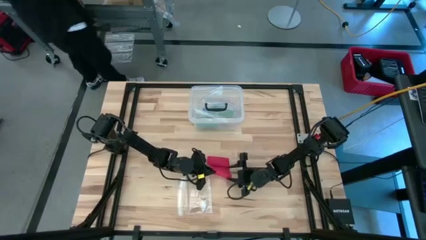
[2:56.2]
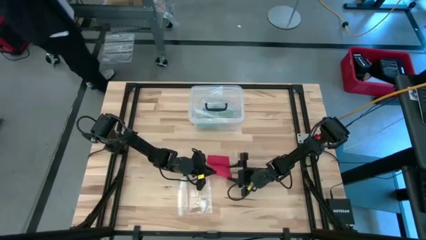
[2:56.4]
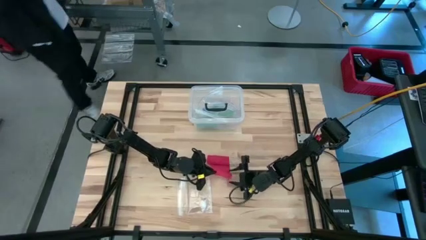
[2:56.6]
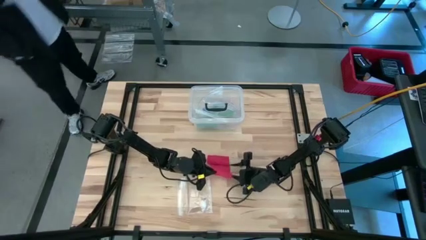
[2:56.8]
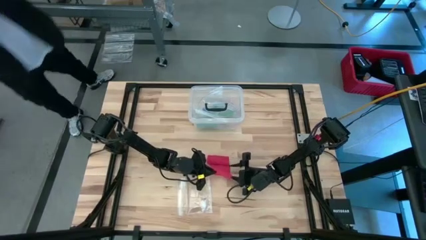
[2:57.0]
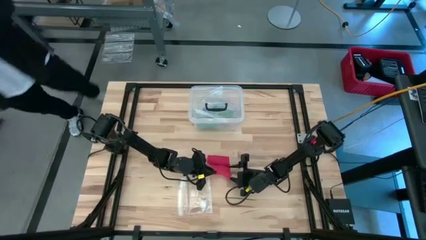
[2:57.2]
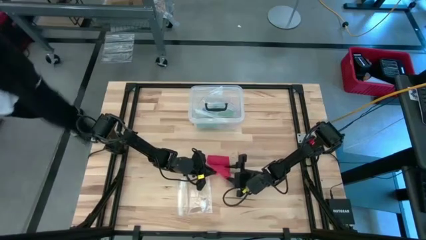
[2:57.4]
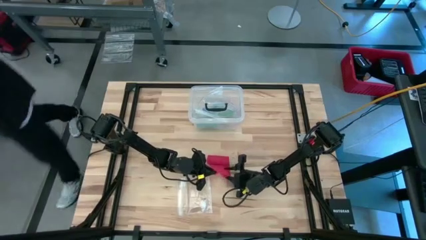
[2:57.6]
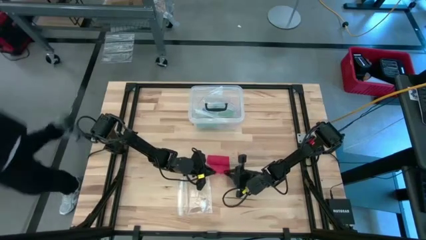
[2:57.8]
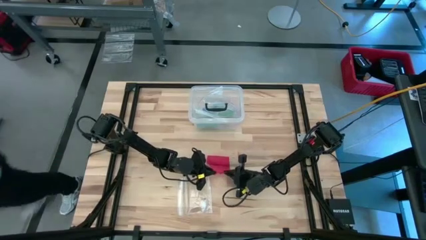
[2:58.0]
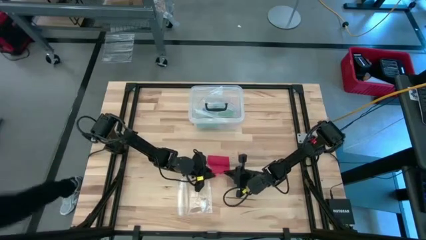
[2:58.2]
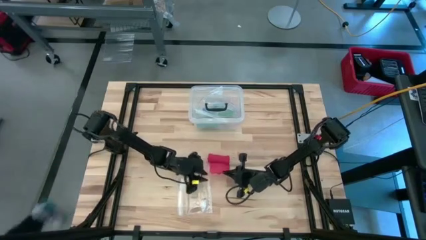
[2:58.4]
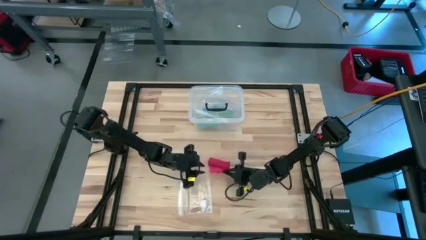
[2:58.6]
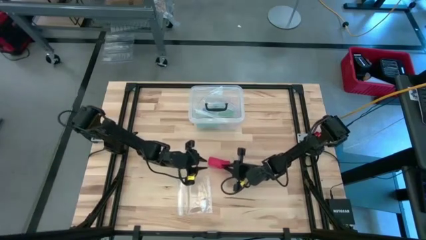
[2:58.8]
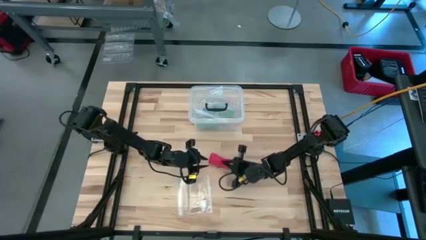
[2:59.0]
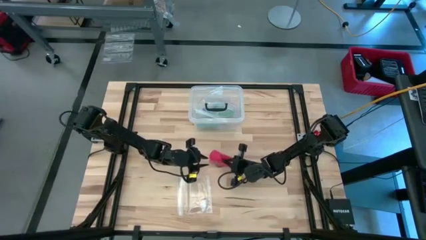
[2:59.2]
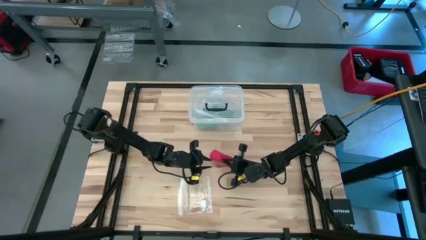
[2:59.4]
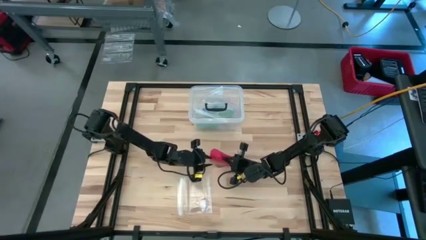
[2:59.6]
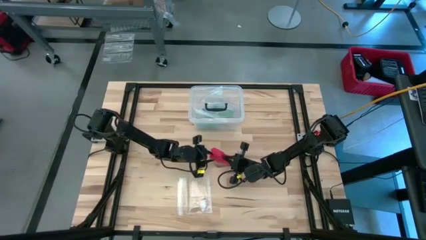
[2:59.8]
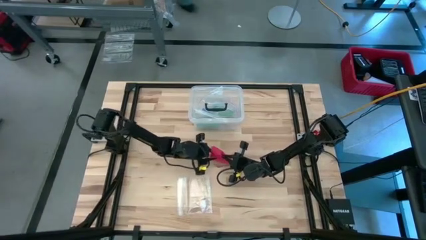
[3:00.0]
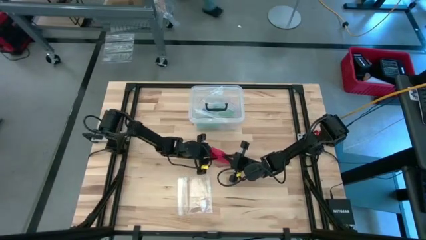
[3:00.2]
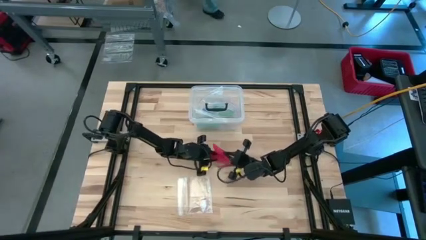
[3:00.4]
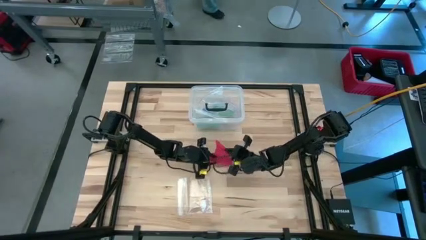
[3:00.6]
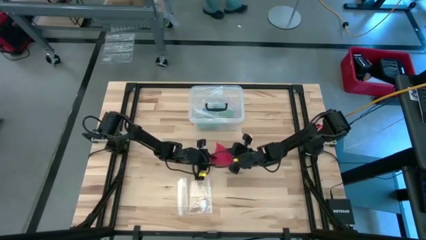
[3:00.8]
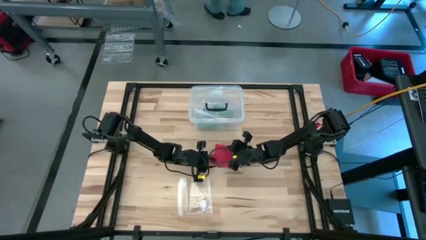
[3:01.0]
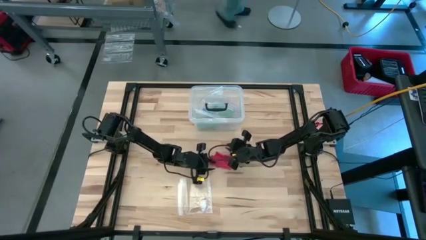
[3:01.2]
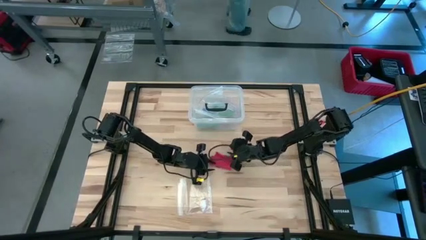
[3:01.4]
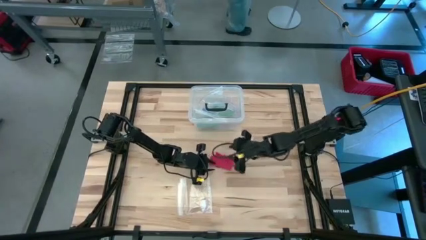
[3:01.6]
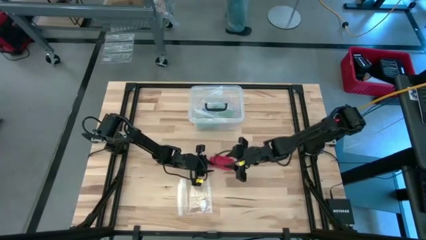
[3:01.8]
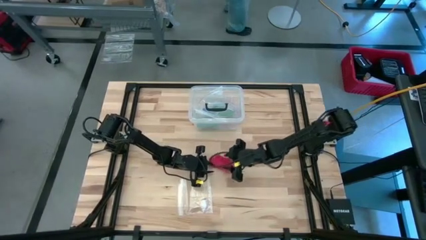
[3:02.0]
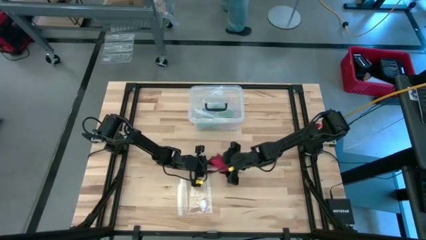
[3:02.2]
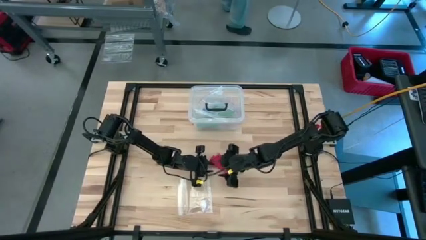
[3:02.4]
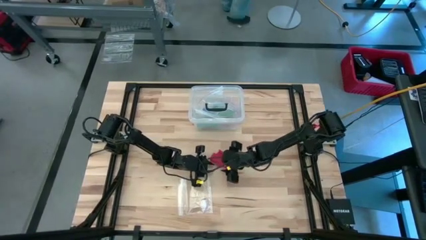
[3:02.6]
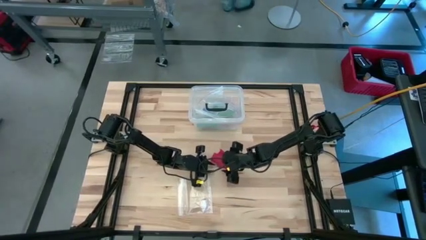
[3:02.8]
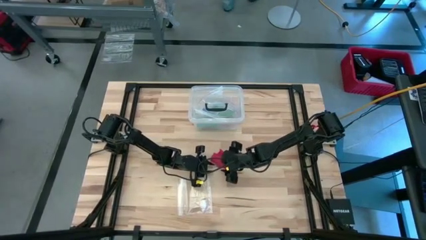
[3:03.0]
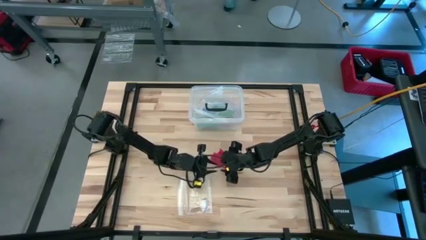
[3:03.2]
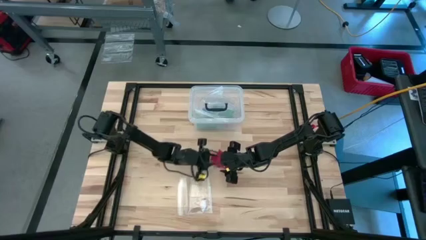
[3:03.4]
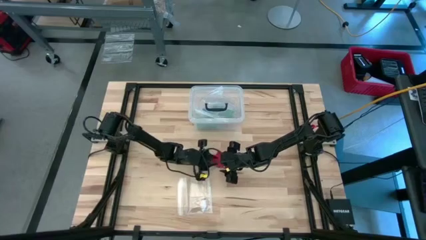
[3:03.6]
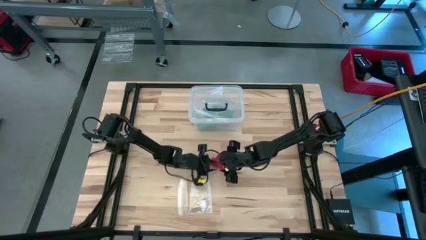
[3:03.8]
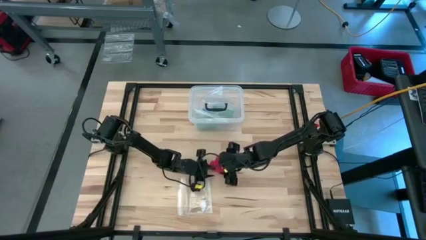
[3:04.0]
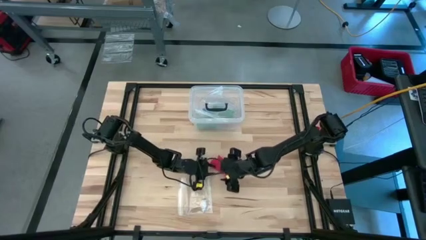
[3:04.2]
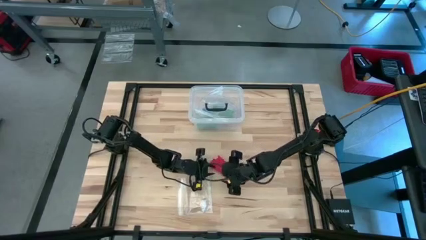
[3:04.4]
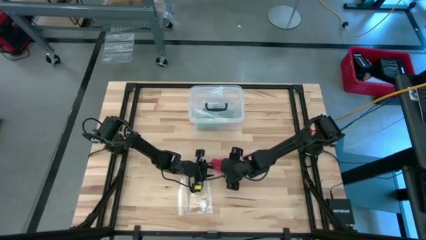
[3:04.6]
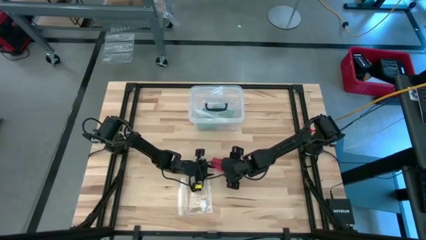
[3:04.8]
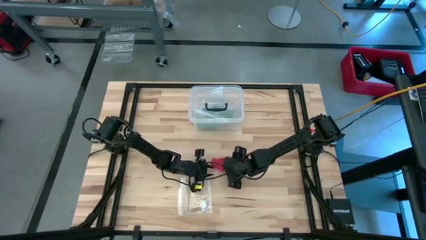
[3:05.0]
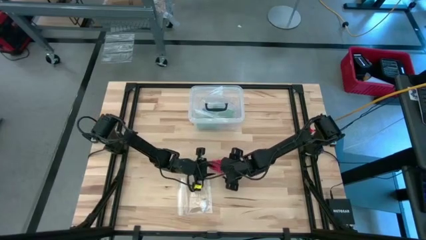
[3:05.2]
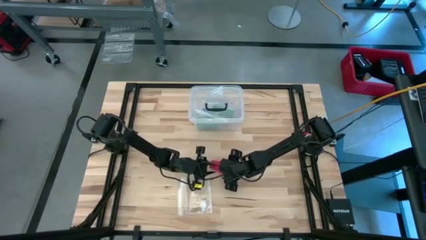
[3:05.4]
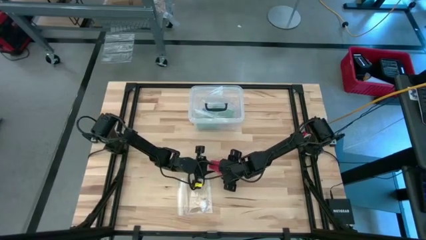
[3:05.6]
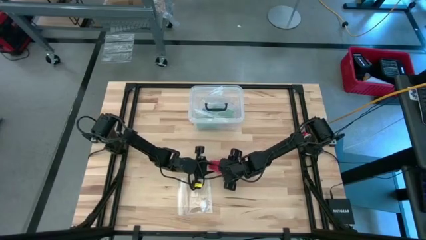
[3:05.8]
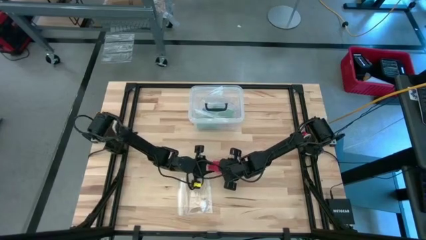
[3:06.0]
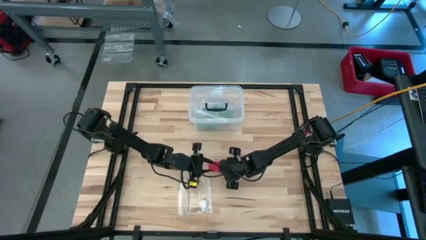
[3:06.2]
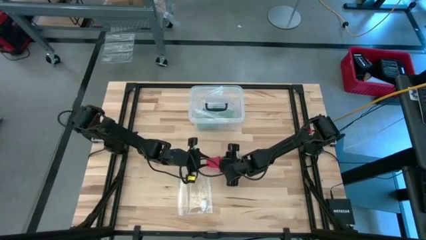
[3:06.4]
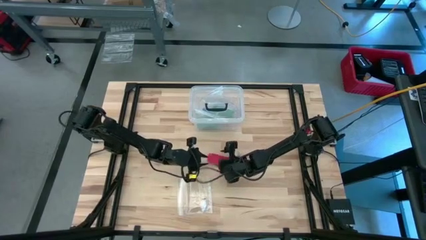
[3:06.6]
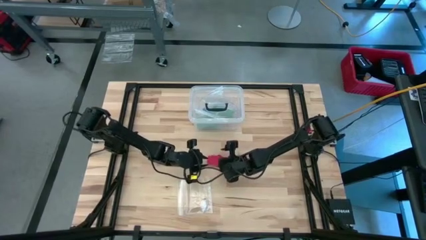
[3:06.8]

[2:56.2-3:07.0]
Task: Roll bandage
Roll the red bandage

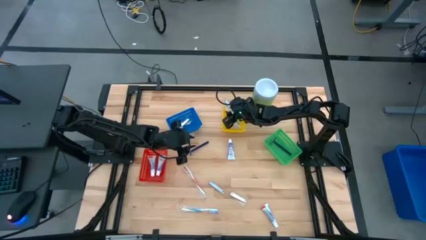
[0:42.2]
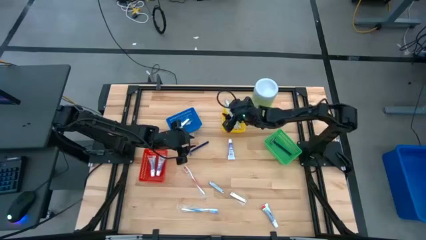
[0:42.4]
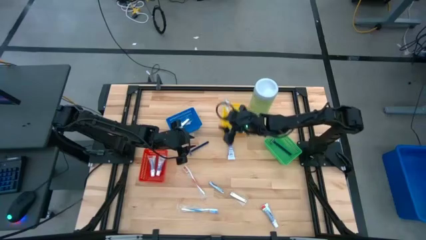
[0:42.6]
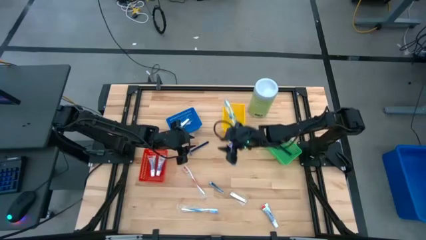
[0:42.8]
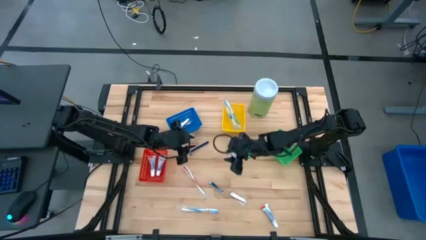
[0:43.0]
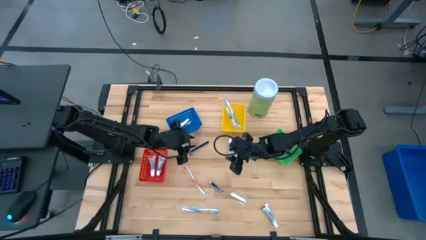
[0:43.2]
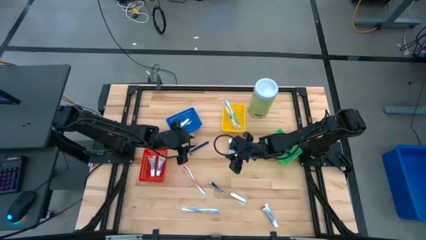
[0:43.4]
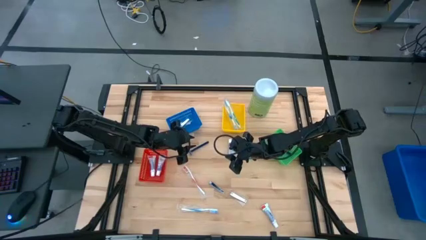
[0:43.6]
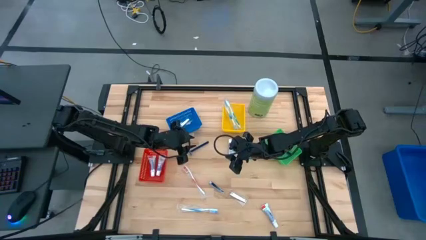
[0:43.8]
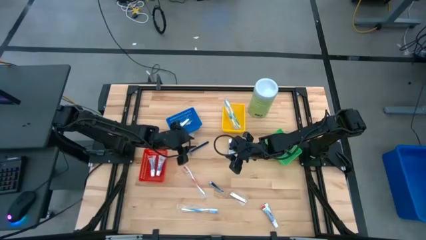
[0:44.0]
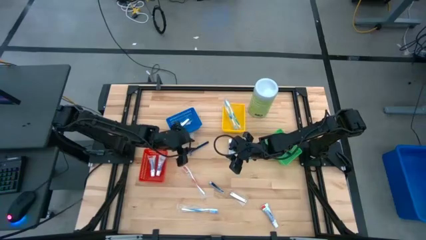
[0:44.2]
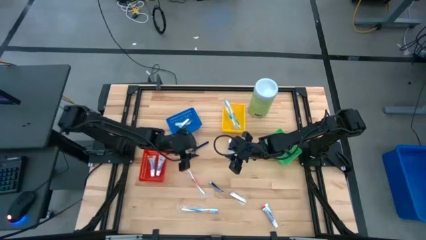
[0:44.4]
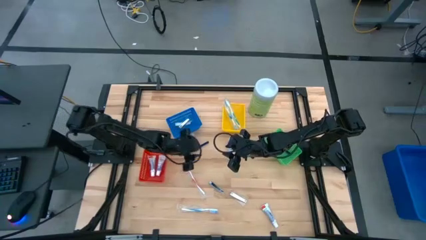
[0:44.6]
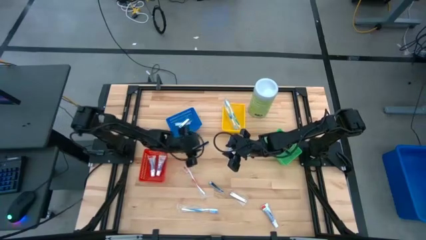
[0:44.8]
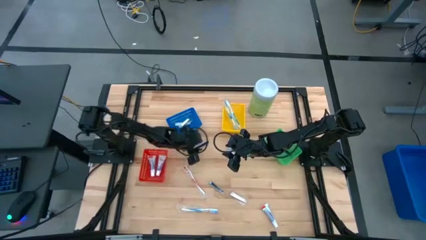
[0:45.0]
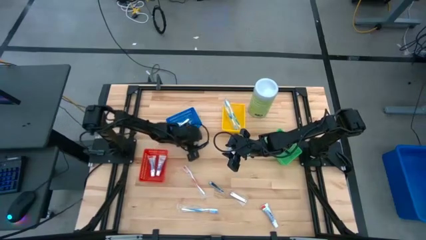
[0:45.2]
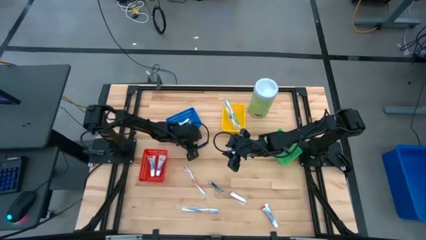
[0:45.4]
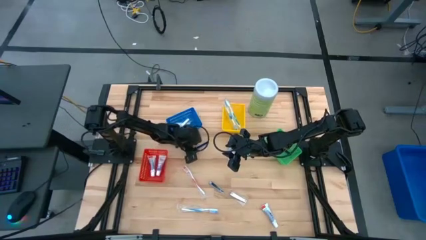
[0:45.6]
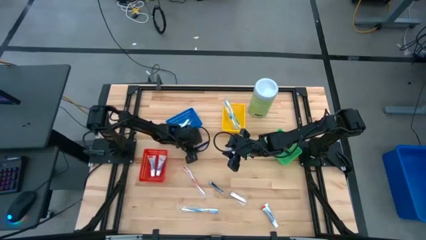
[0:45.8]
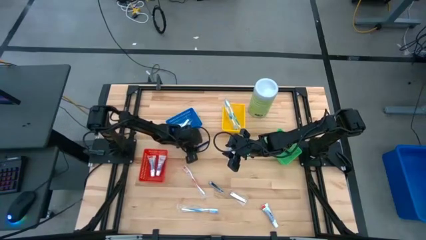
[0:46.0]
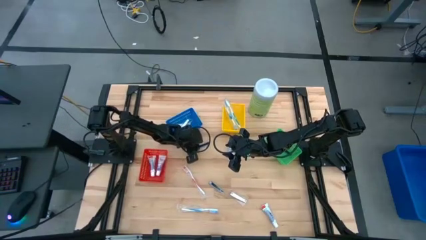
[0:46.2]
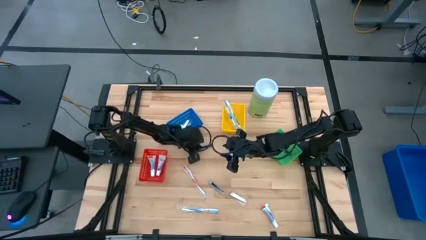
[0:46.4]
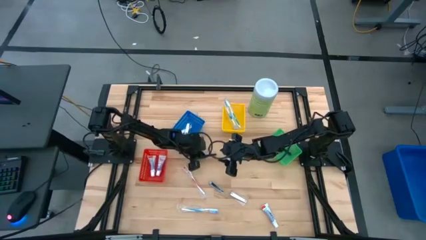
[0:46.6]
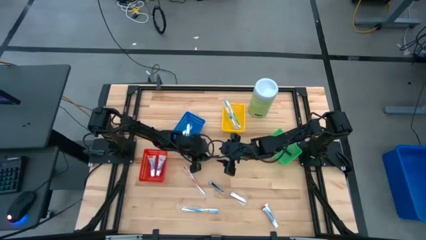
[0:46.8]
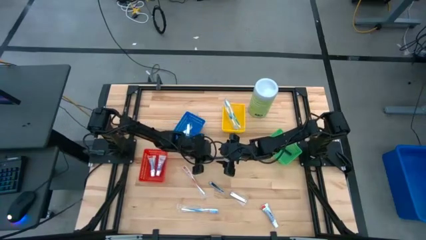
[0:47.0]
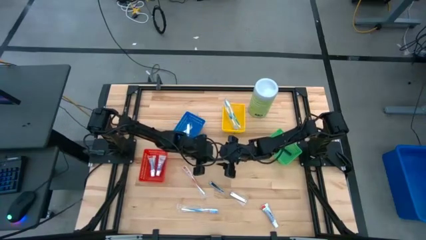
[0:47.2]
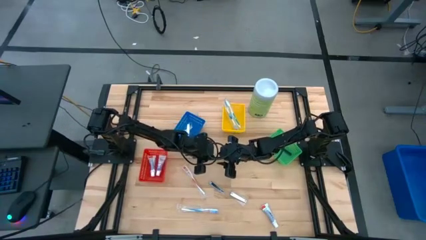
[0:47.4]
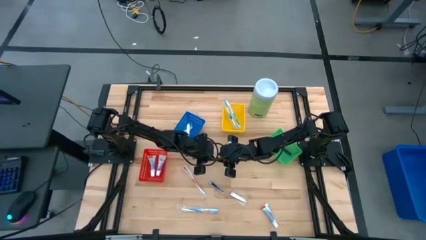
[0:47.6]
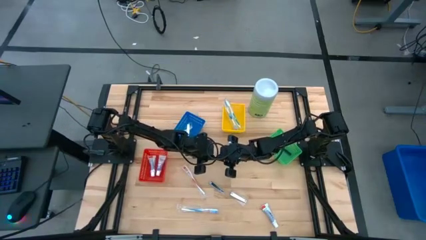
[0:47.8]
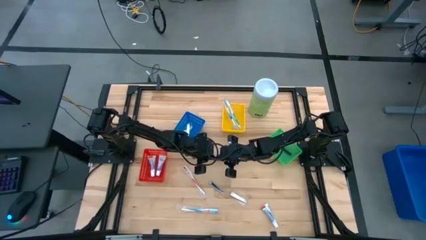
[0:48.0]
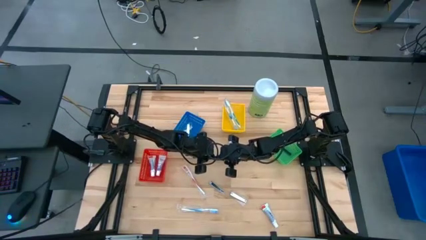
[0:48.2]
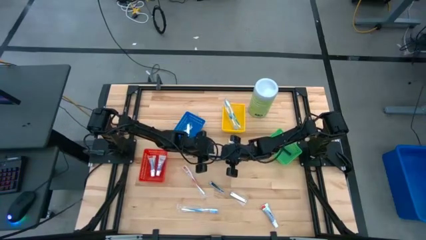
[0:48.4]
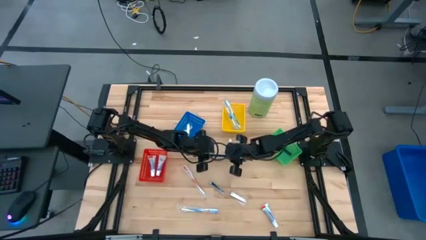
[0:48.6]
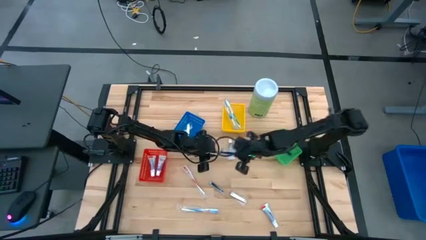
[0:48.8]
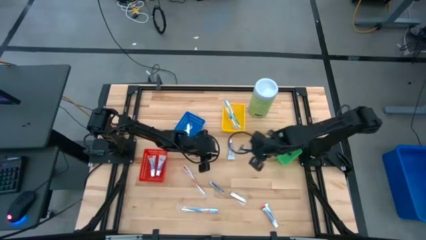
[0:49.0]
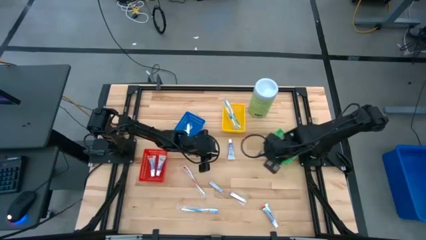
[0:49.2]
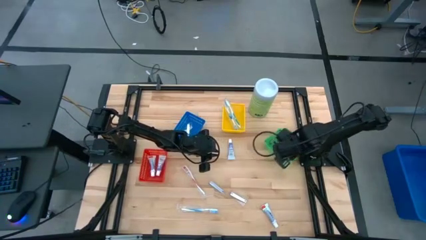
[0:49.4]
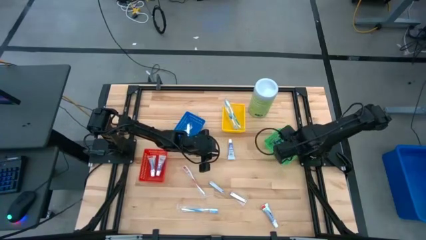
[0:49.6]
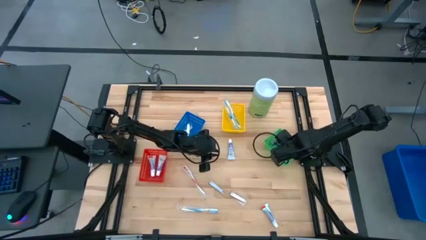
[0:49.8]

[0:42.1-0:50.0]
Task: Pick & Place Travel size toiletries
Put the blue razor into the green basket
